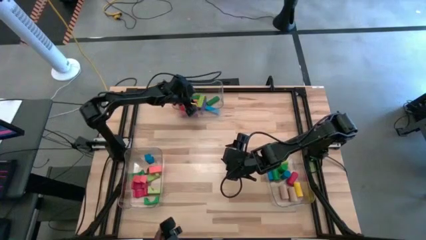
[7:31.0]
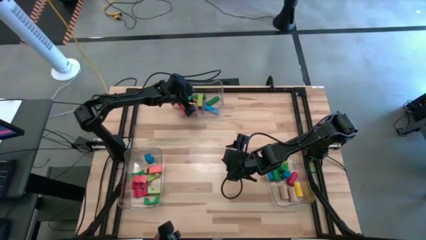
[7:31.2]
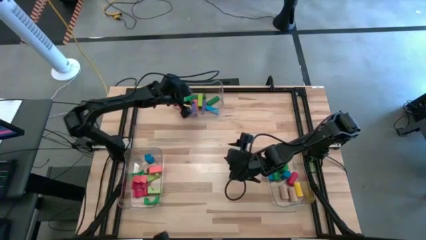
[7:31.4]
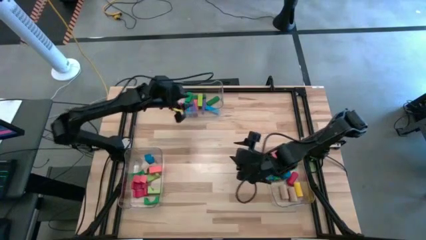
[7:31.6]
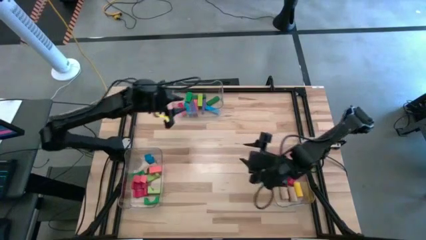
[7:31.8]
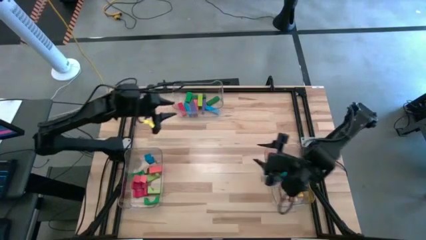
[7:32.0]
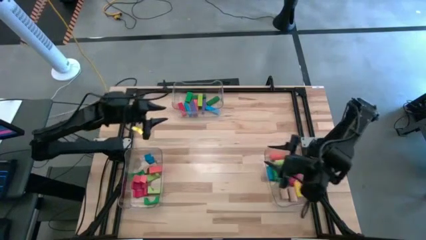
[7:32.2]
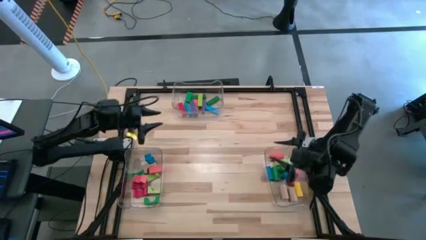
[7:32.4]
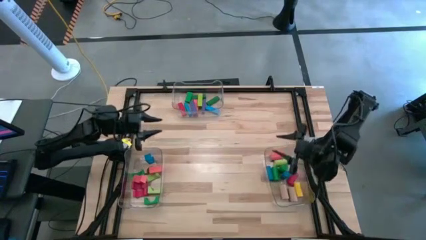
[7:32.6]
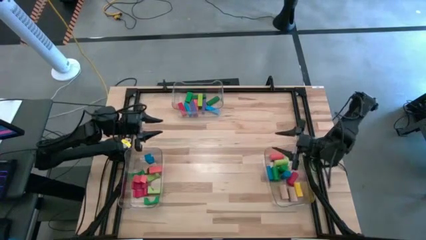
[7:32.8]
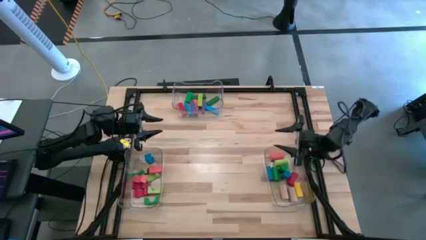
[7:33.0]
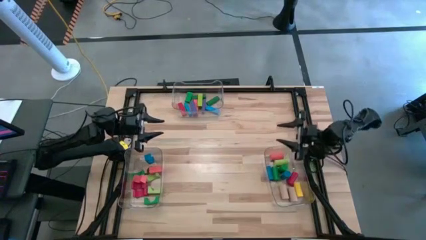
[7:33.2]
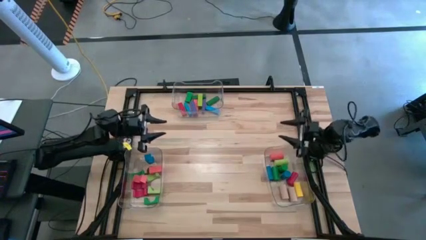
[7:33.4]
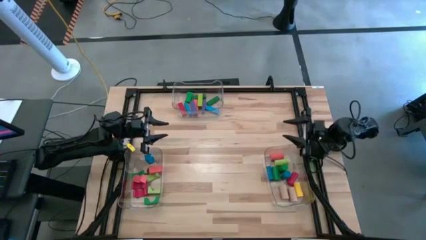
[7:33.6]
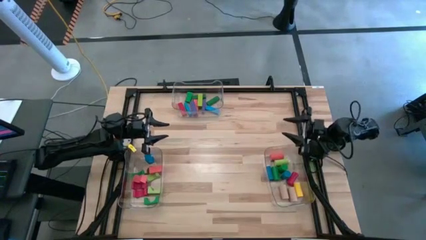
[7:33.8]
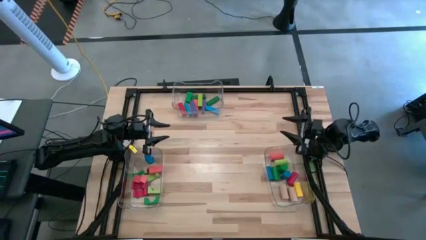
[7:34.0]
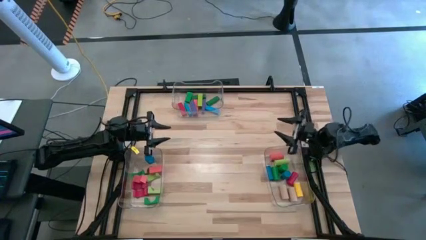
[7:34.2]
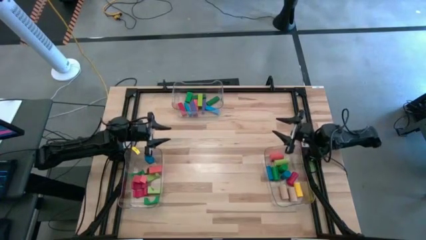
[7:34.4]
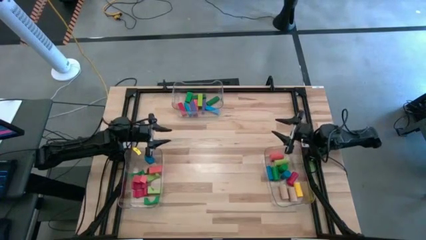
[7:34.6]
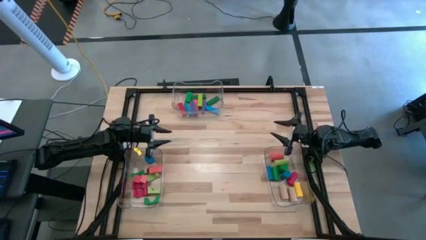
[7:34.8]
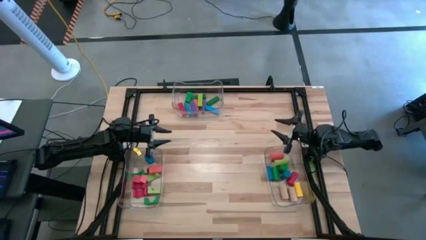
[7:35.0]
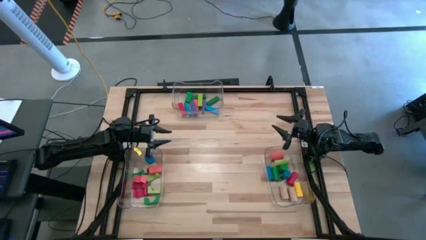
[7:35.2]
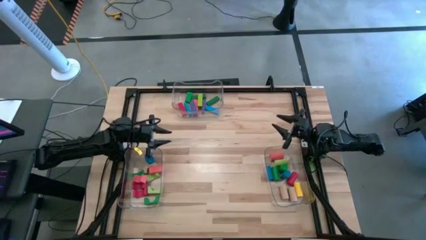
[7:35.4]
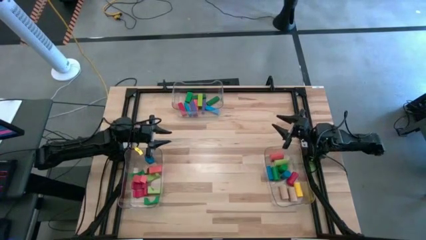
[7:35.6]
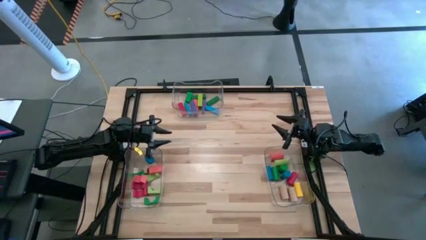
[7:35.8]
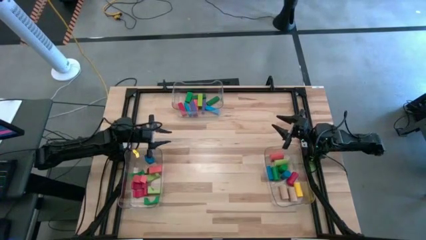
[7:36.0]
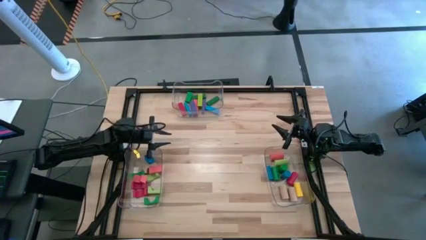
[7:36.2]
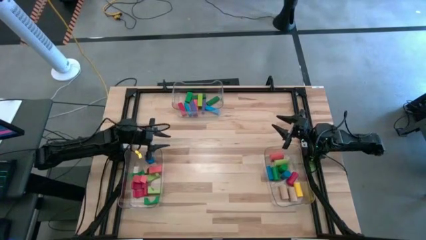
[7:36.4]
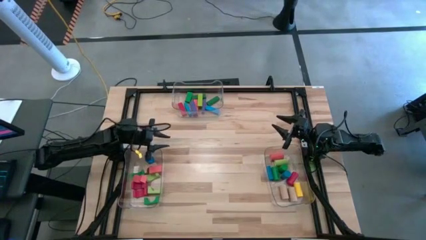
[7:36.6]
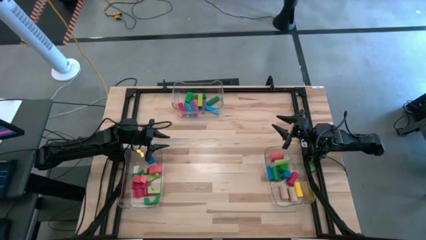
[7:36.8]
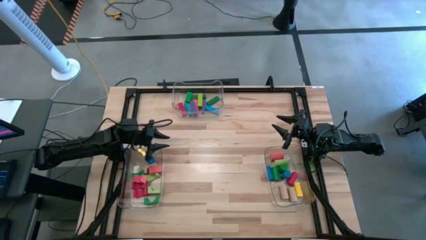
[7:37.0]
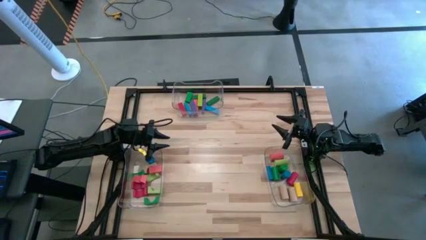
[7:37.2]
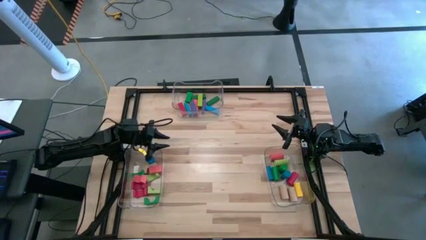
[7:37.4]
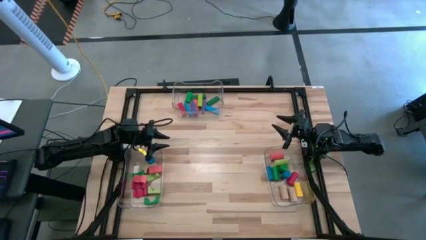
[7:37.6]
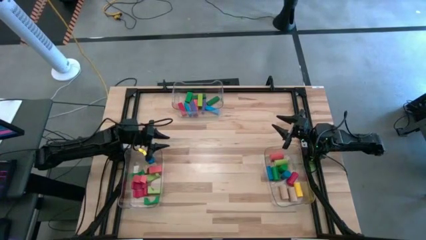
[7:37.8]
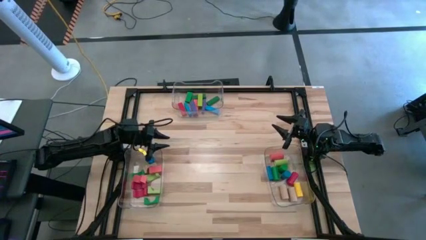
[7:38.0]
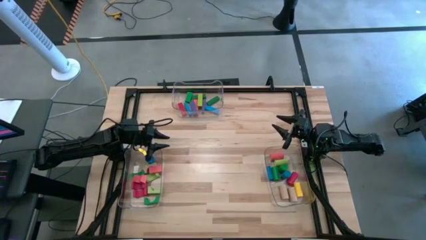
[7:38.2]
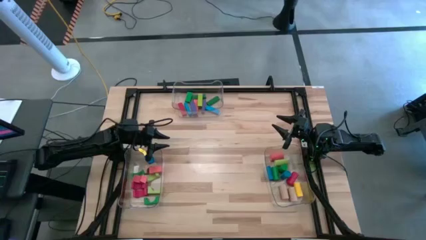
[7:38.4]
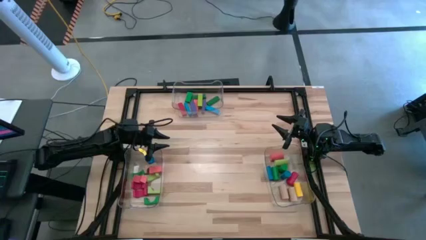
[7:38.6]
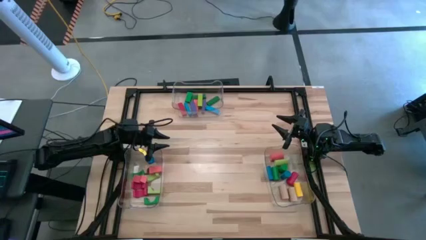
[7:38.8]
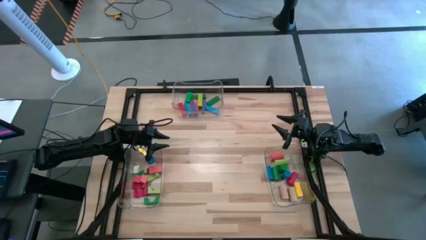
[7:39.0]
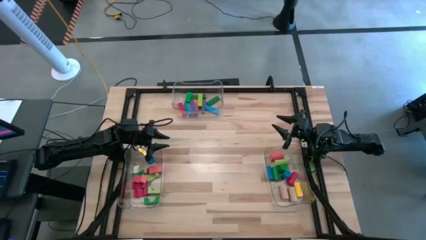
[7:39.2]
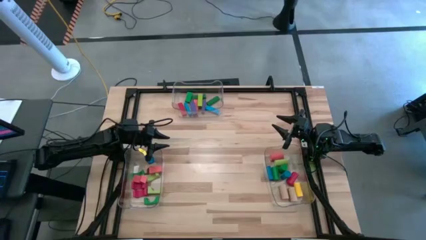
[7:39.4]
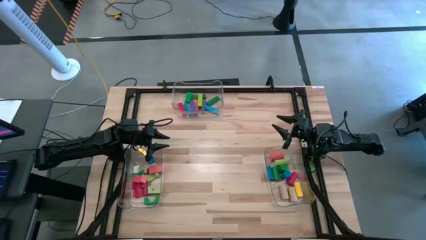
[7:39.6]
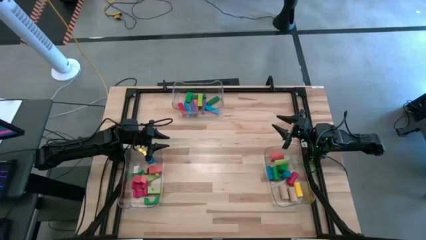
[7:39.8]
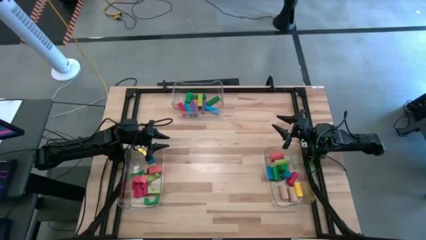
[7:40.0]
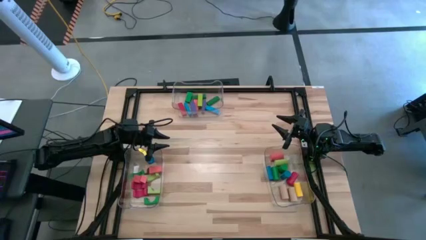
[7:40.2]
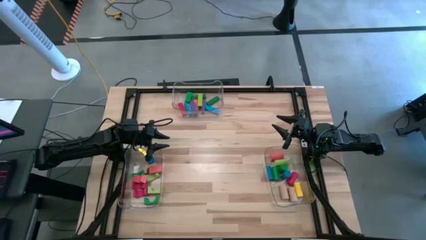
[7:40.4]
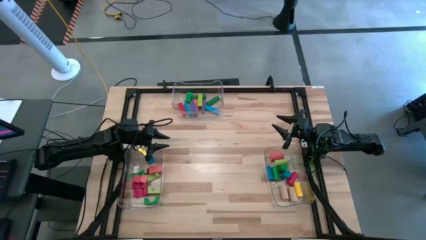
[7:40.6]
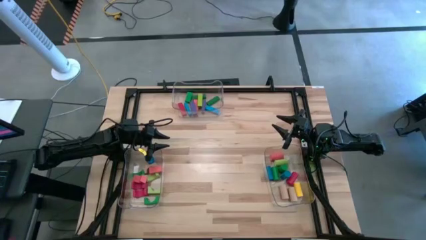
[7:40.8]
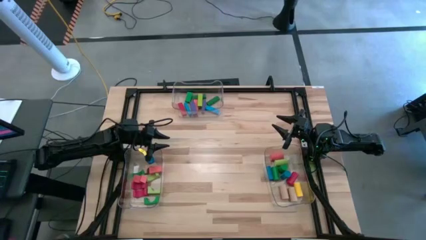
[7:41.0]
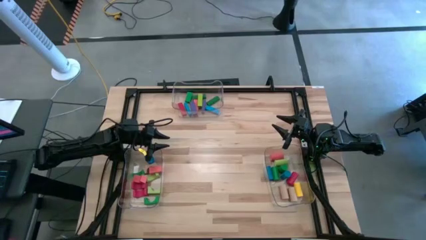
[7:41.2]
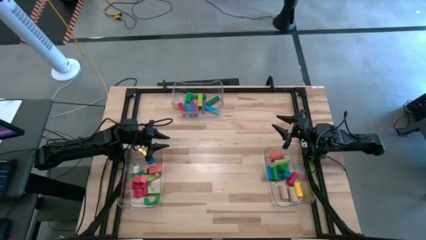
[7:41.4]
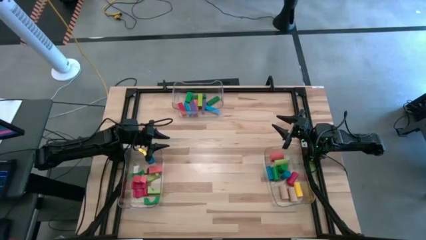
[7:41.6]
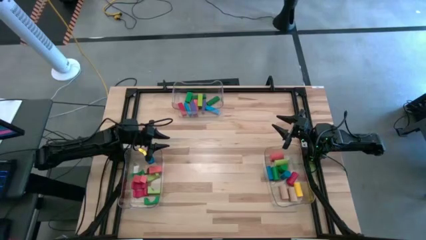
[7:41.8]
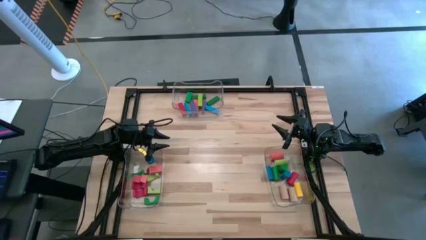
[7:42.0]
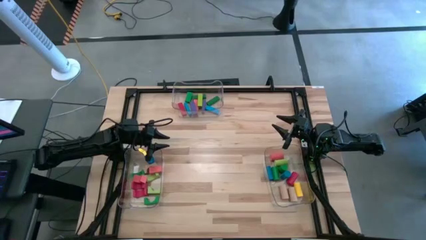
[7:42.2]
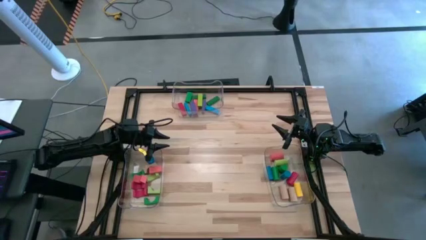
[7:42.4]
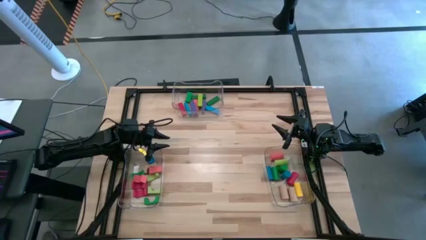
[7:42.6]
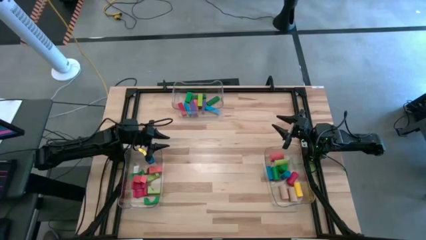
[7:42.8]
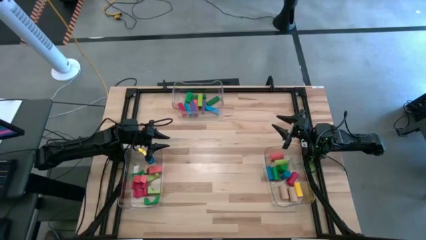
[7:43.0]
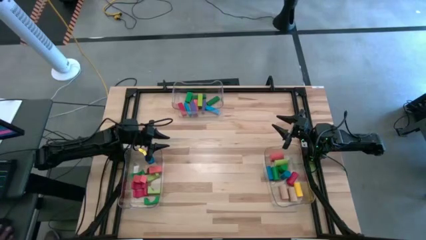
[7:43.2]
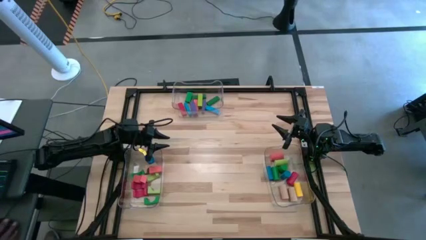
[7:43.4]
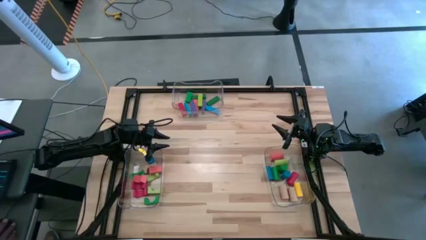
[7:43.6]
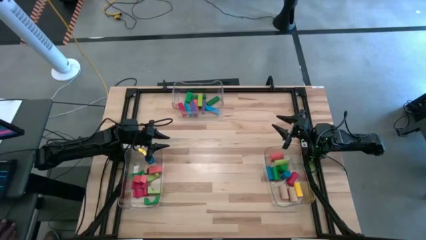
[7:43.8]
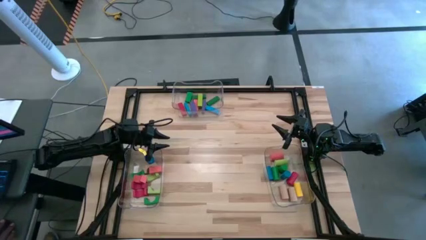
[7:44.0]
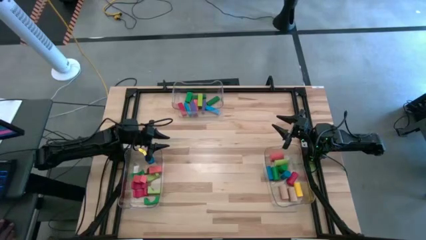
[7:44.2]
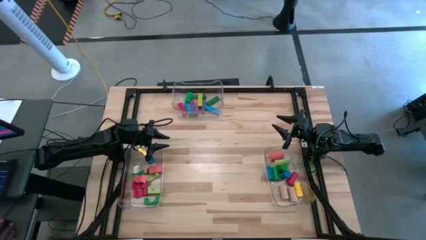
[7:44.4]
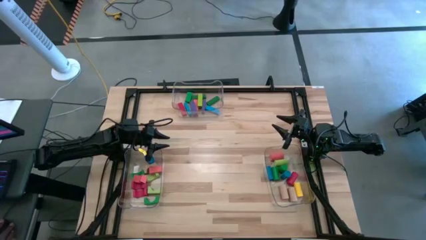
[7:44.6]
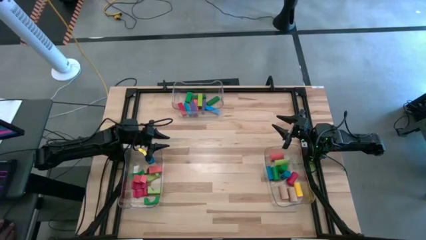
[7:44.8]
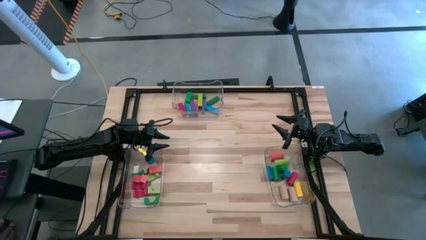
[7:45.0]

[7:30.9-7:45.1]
Task: Sort blocks by size
Return to Home Position
